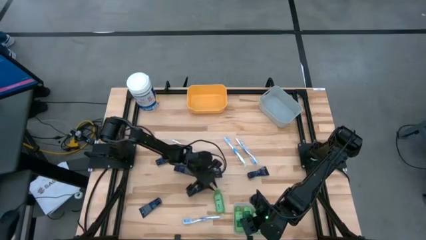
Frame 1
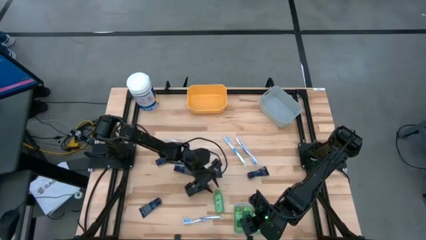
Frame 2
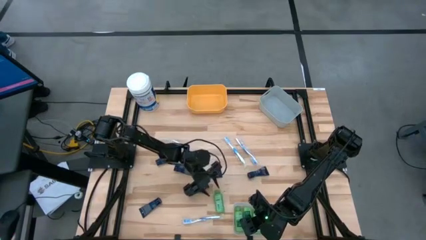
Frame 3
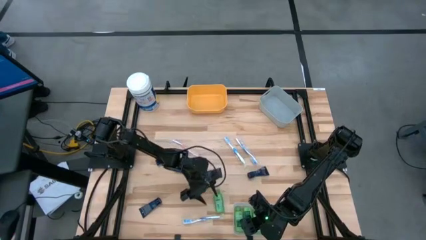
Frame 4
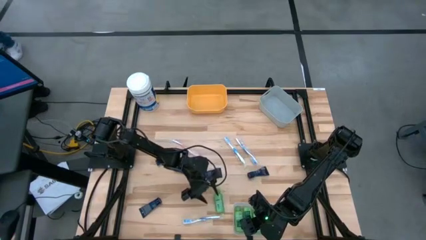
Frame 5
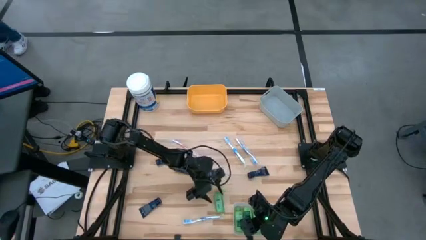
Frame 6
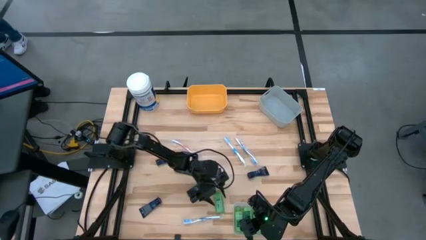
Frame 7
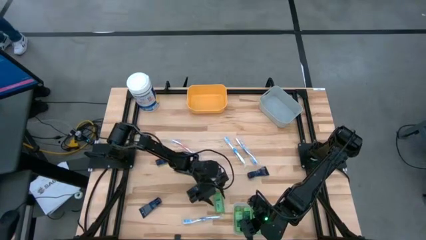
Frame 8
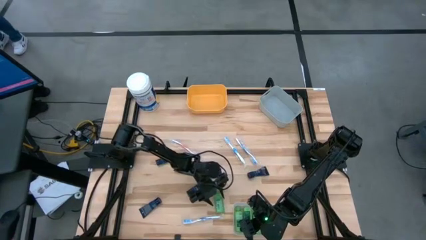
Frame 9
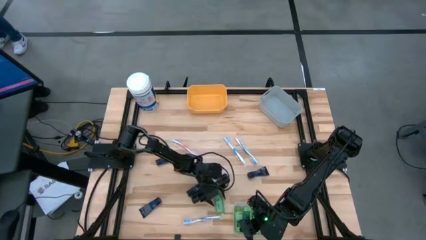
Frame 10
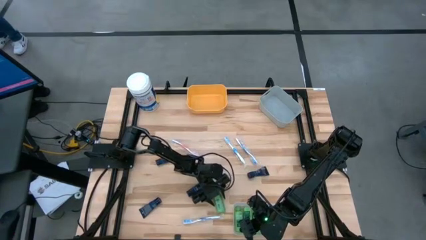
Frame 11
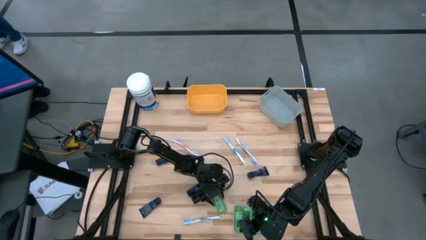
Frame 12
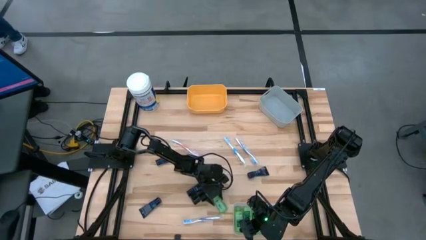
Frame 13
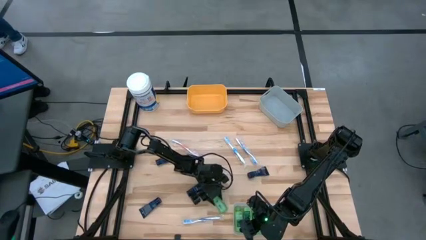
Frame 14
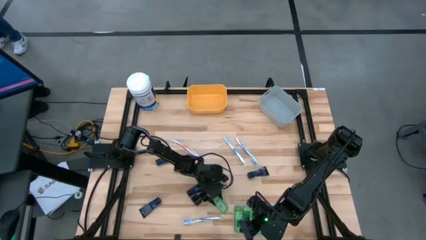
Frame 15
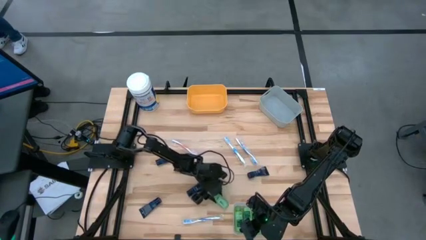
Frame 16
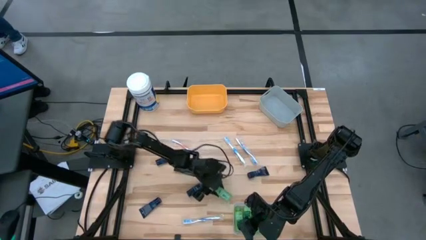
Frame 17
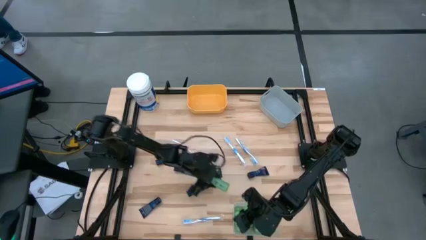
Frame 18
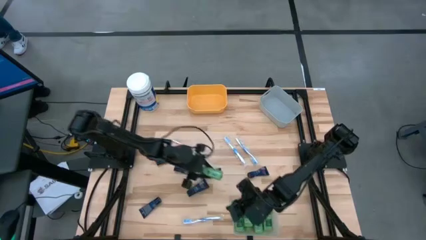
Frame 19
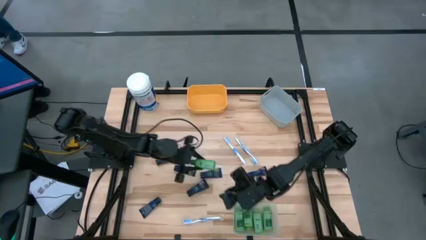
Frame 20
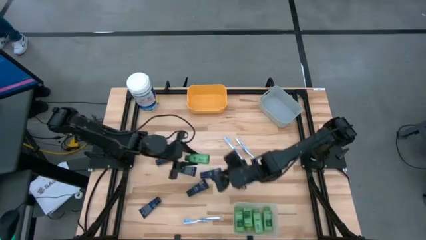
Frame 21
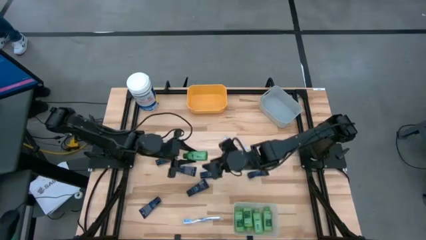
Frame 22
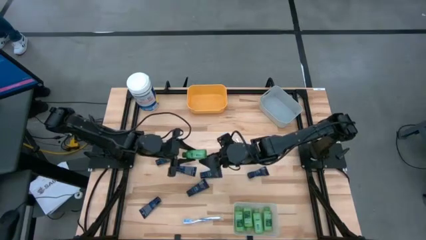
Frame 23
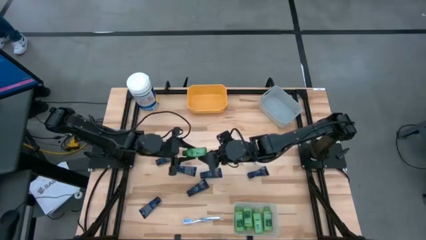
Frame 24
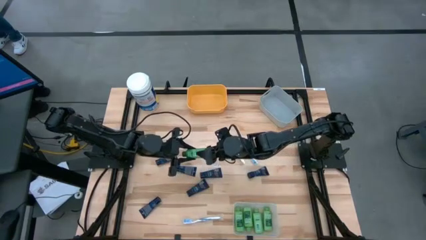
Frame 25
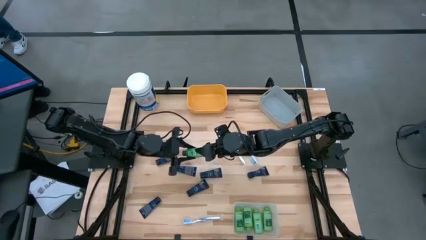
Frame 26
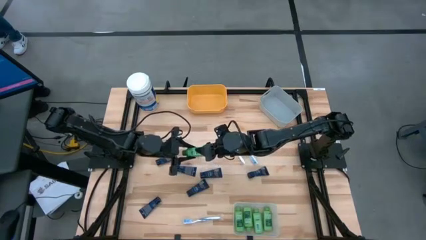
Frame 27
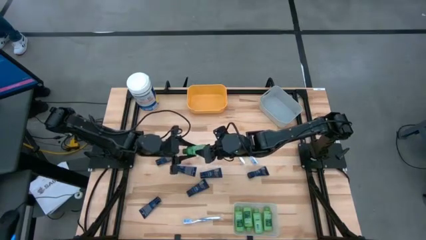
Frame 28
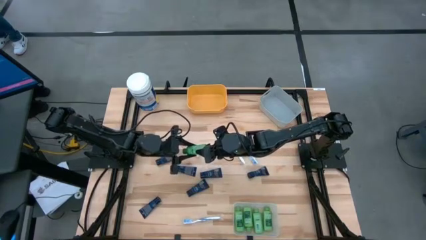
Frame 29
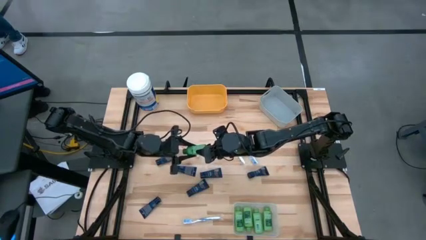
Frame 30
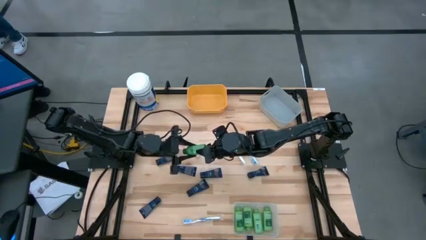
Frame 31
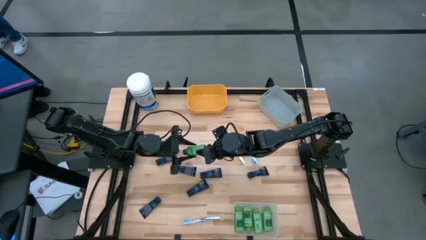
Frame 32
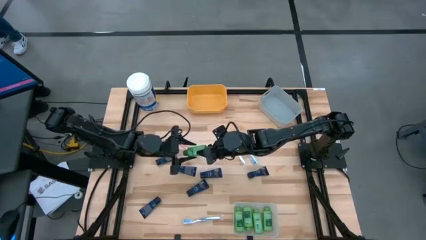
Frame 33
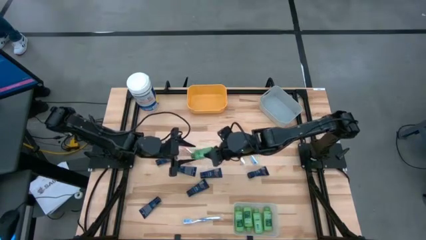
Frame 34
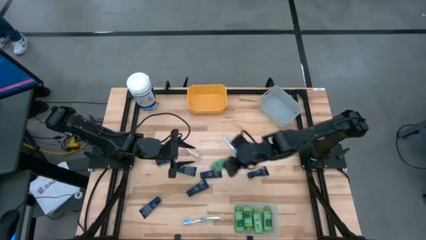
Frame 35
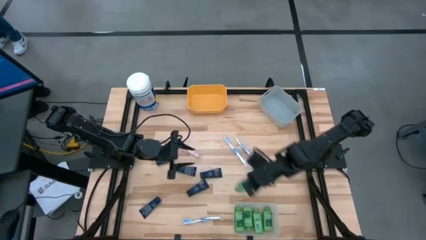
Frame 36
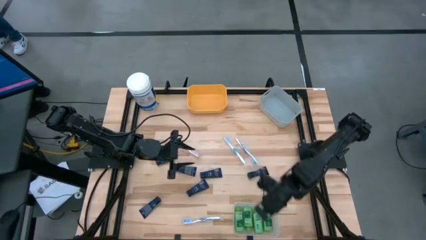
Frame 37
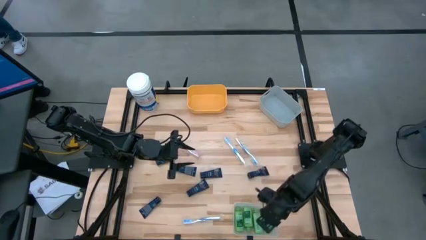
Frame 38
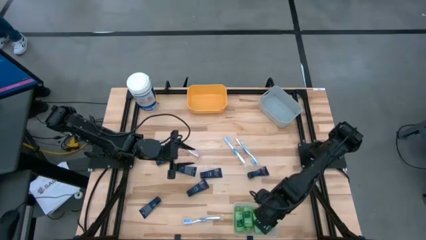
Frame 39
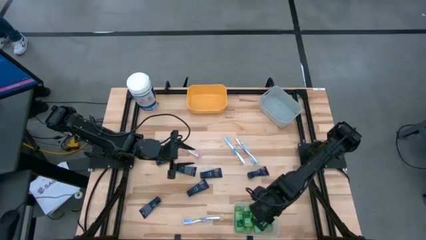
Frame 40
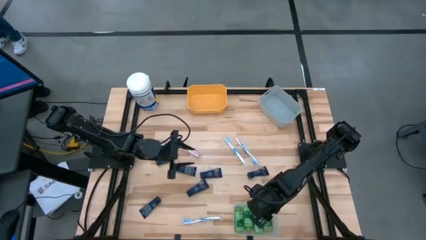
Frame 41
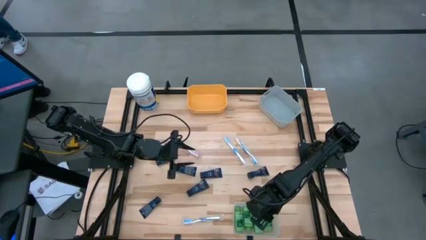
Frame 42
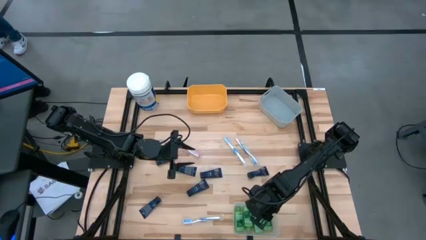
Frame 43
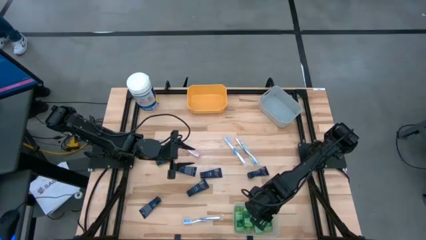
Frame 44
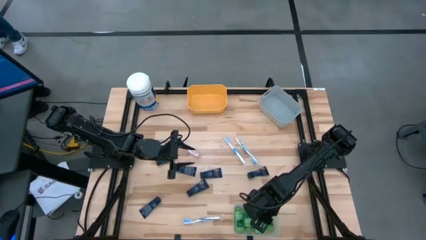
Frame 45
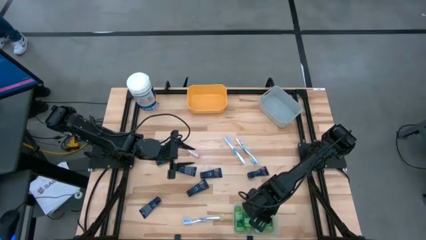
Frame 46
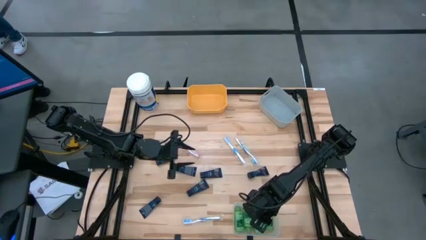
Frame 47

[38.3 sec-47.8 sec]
Task: Pick & Place Travel size toiletries
Put the green shampoo into the transparent bin

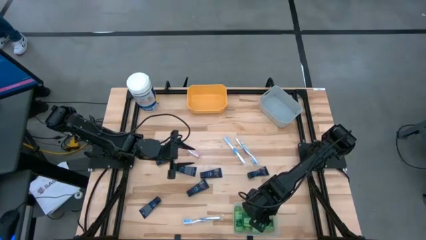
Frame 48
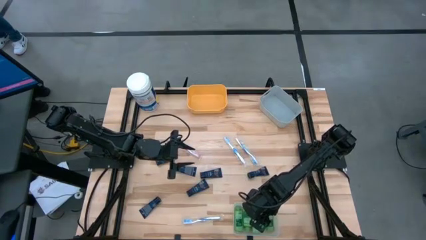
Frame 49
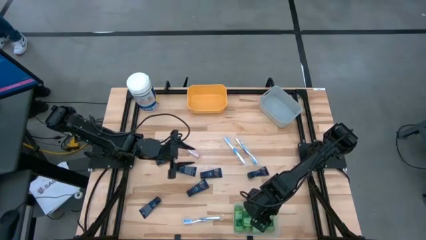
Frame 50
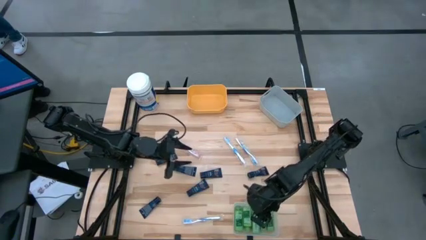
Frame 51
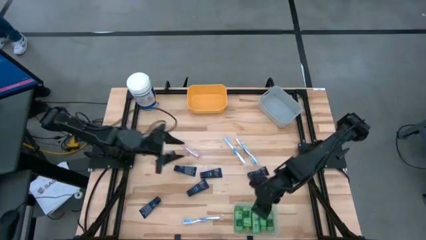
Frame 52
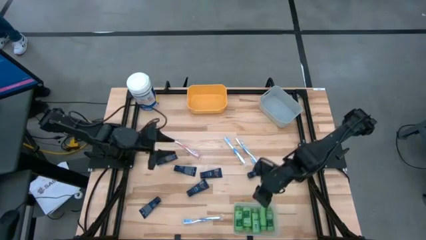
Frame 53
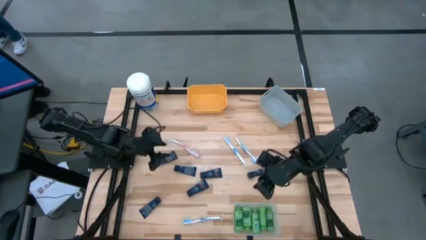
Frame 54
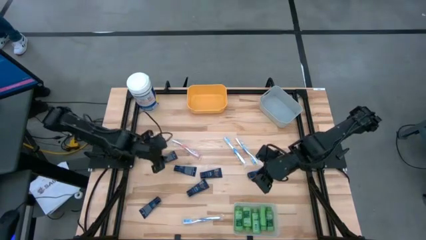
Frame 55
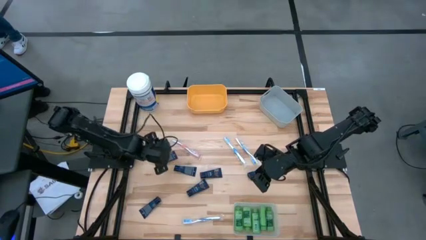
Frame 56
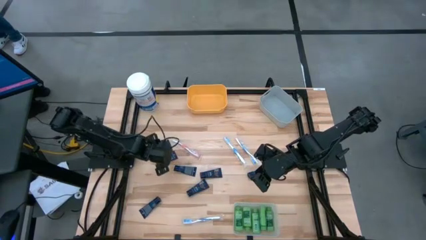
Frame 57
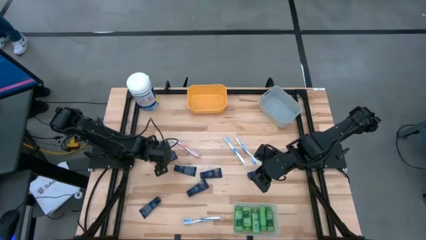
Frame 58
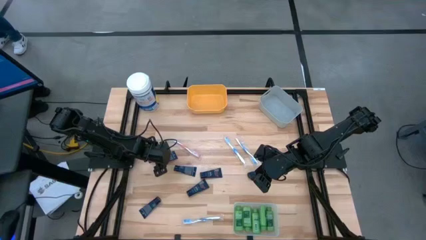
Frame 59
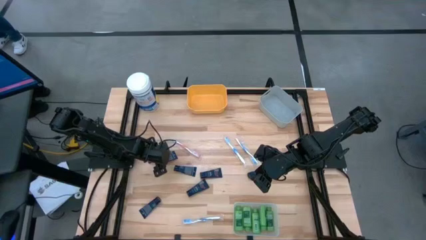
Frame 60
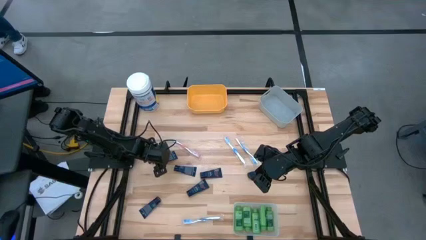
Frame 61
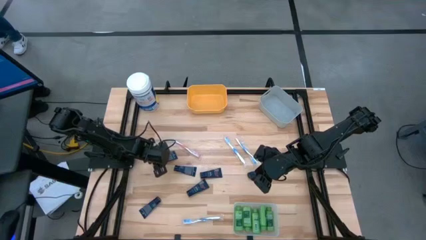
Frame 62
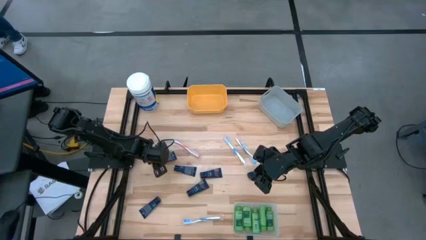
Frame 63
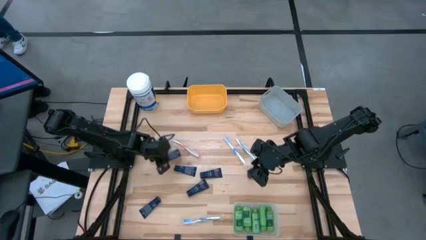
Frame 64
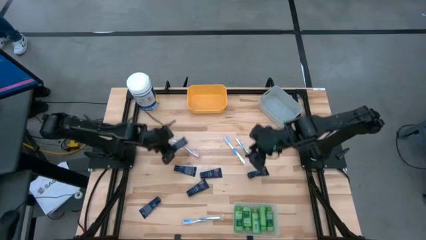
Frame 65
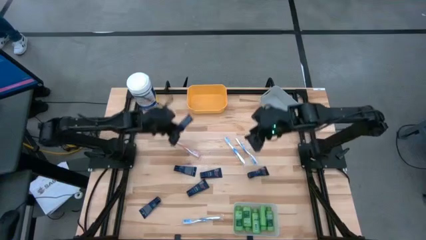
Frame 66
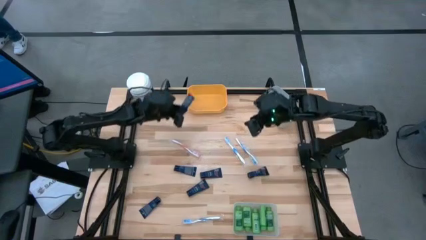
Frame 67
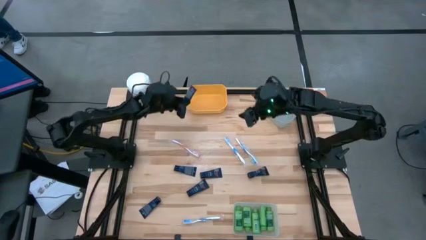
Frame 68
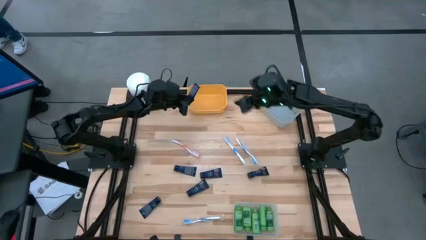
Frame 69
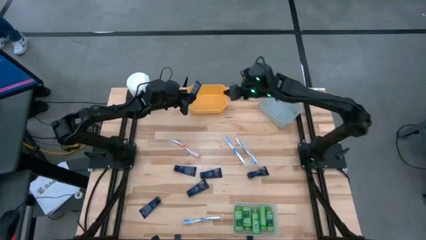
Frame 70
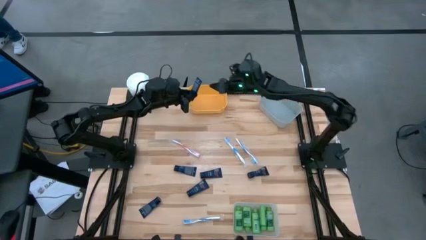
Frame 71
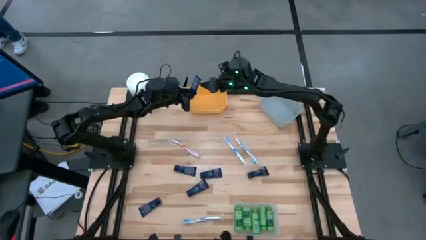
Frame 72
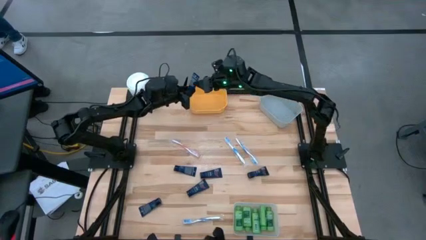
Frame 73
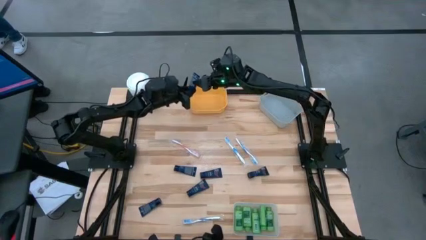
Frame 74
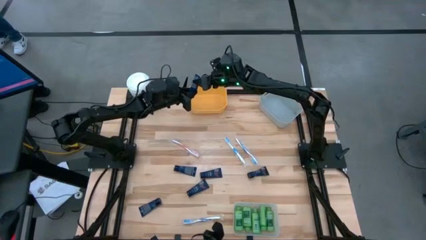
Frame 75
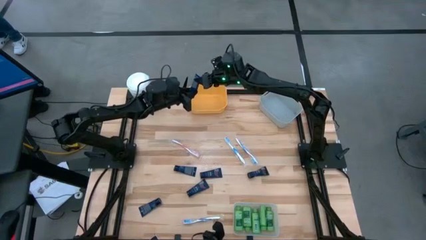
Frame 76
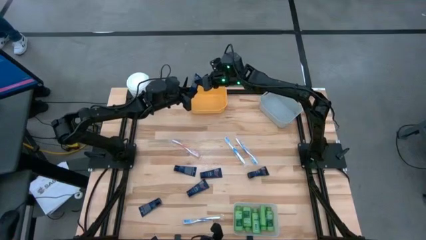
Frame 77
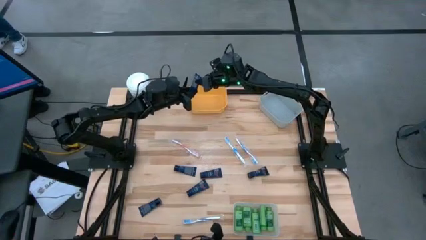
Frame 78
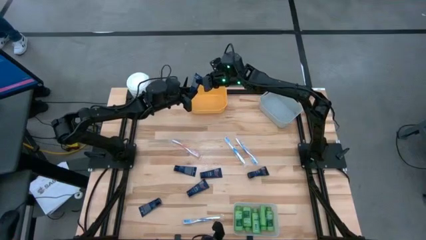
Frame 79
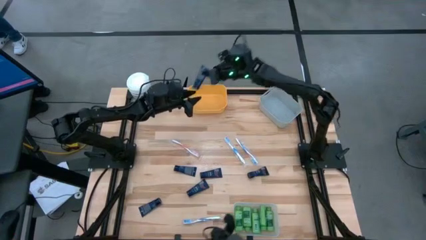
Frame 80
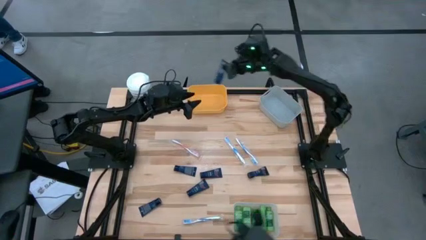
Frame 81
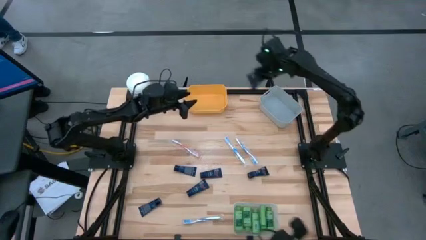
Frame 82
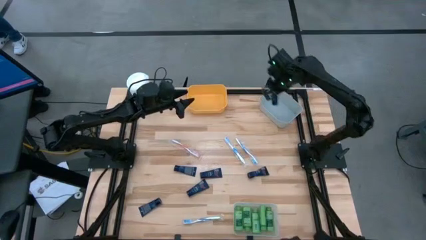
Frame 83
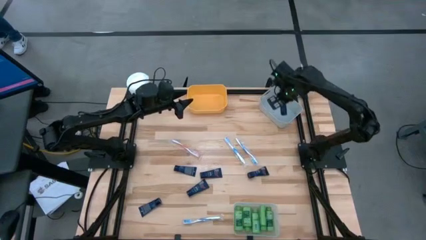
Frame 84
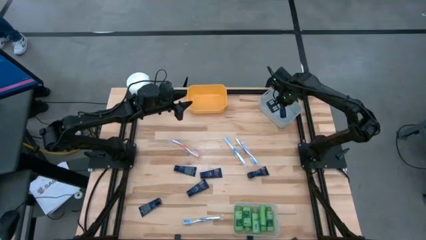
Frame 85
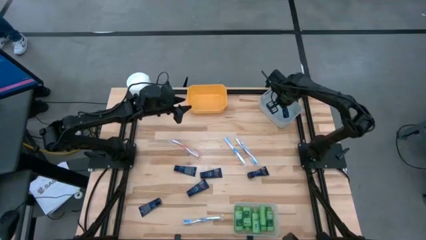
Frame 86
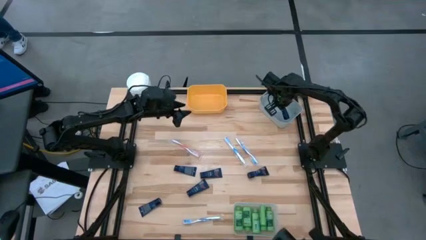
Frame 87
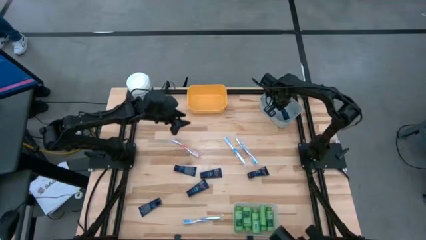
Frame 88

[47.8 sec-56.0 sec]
Put the blue shaving cream into the grey bin
